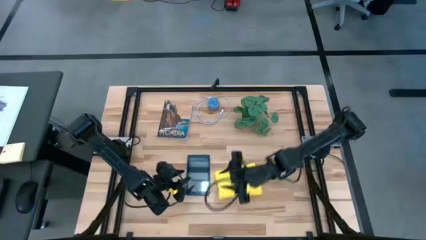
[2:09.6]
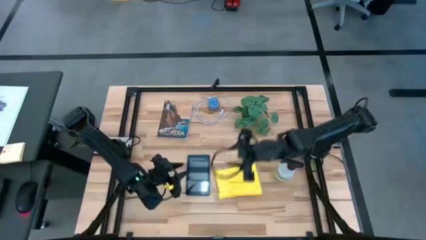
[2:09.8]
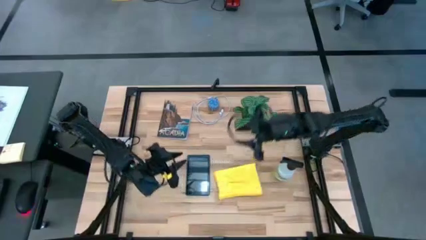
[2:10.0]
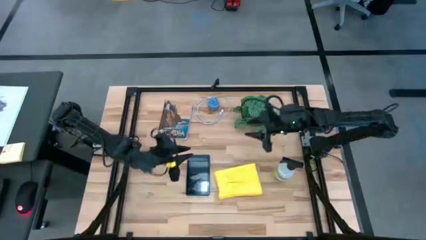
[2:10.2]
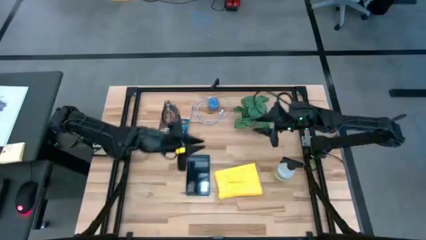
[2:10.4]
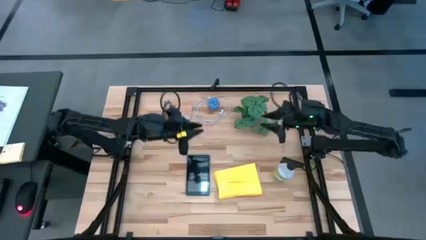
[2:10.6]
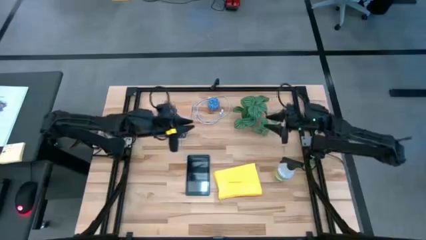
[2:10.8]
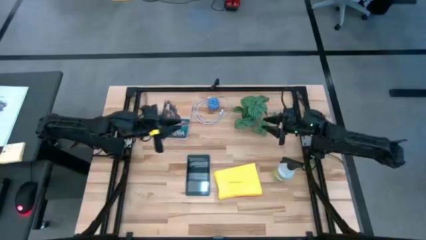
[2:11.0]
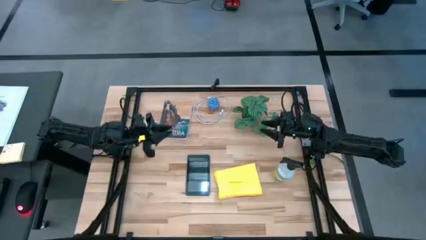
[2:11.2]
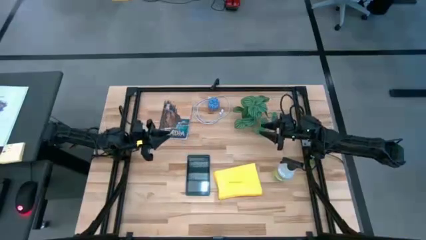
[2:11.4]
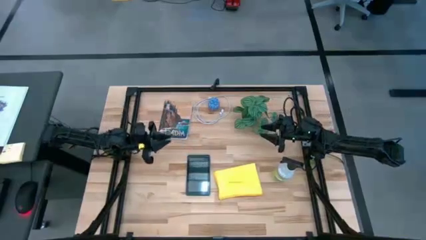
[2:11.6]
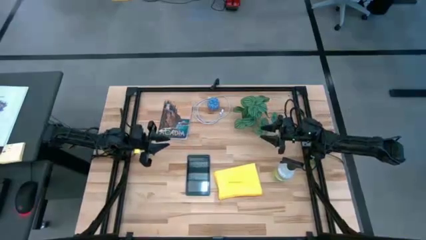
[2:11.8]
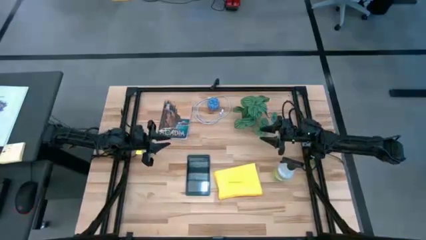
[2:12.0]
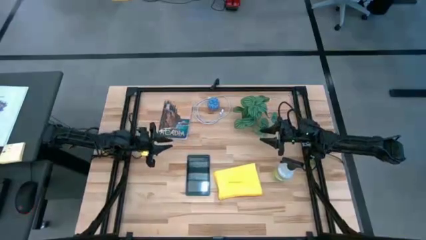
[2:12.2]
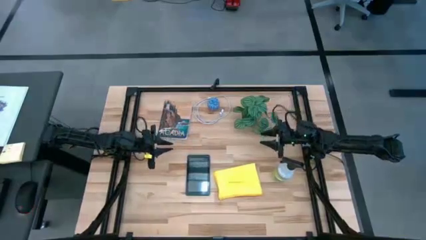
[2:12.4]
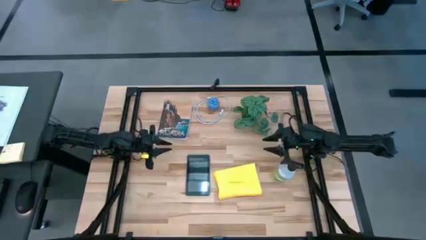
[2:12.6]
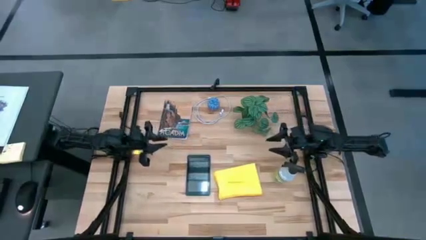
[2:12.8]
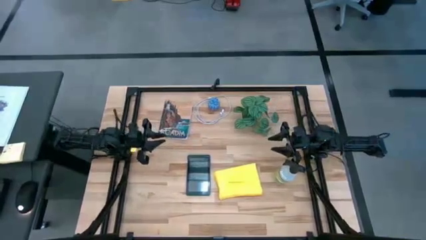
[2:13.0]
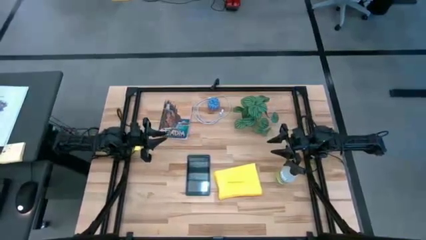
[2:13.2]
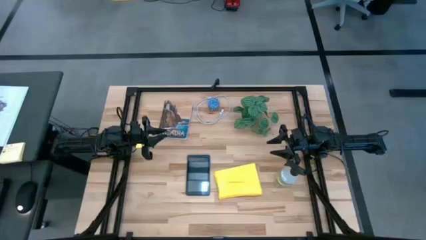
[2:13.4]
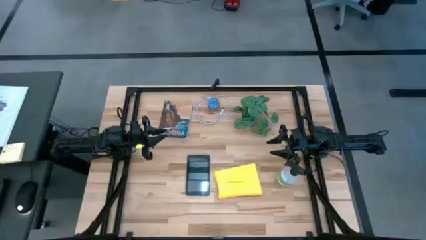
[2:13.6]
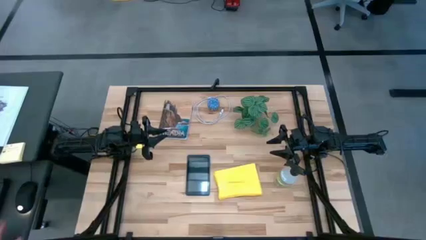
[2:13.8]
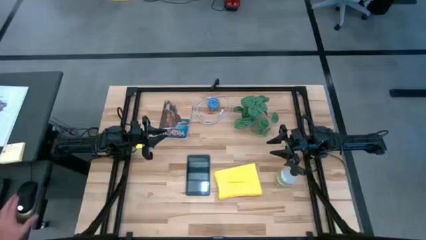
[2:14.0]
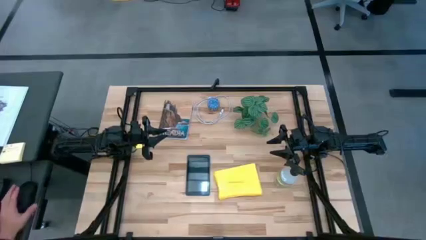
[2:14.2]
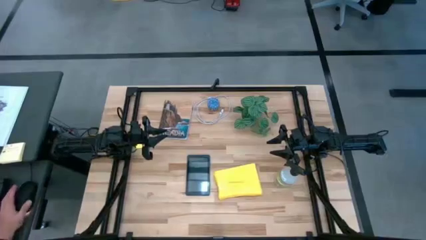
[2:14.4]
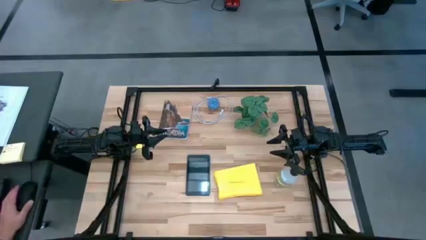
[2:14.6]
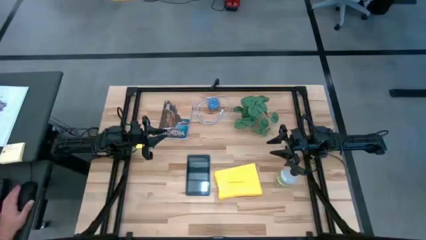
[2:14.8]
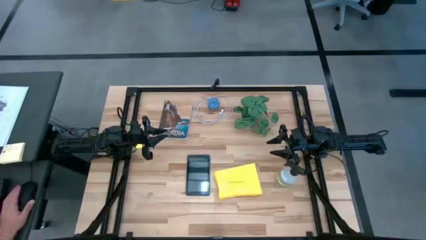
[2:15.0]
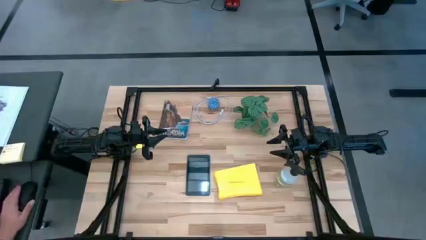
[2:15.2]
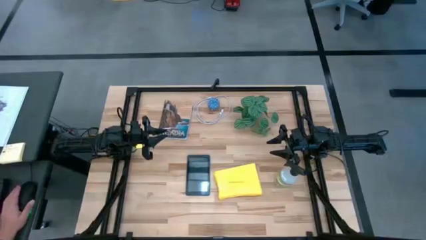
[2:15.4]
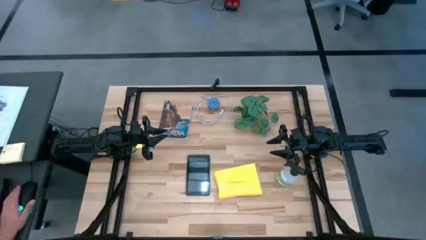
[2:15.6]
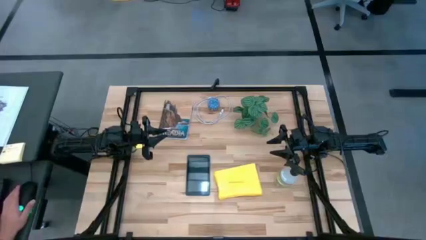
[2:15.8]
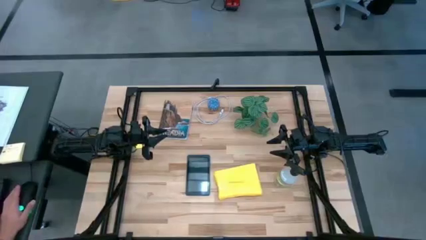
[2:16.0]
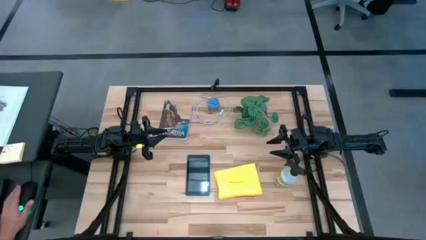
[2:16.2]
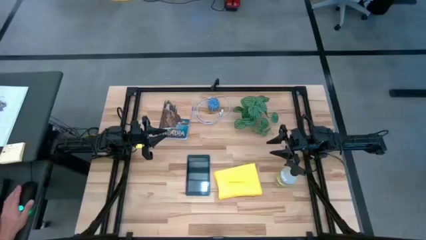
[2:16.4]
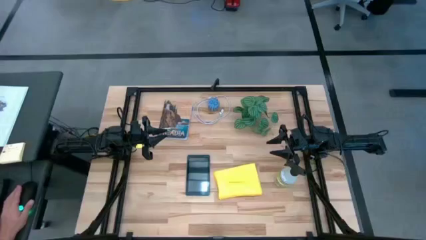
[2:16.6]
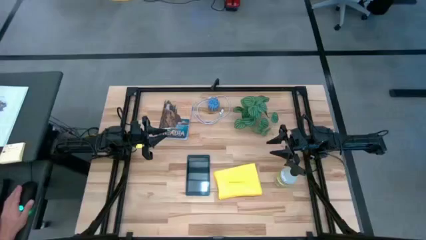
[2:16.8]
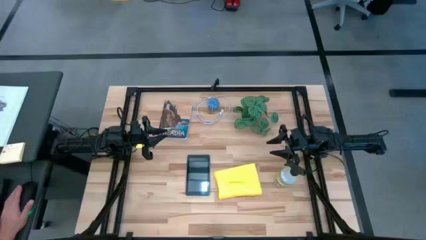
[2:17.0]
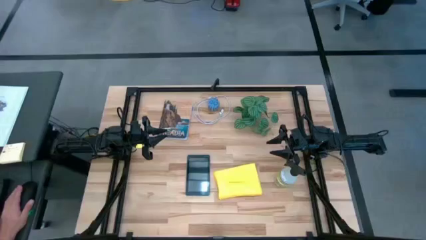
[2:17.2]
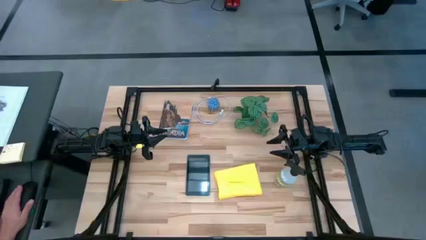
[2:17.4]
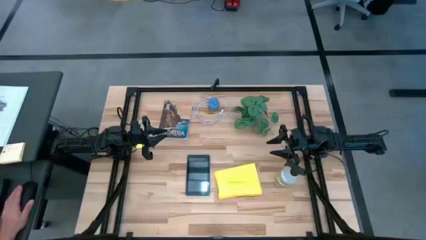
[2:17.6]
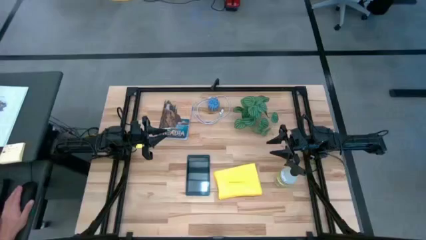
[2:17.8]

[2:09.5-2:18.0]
Task: Apply microfiber cloth
Return to Home Position
